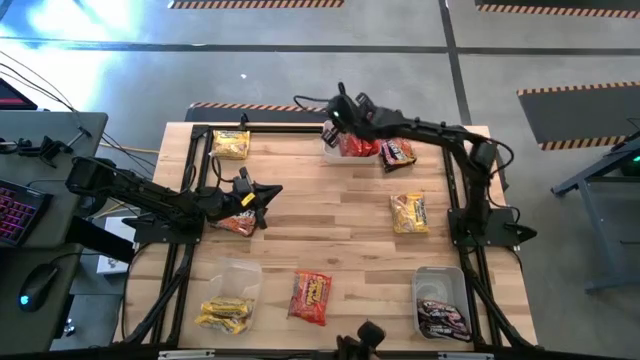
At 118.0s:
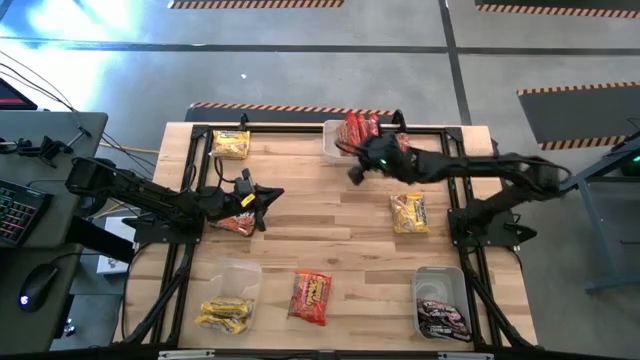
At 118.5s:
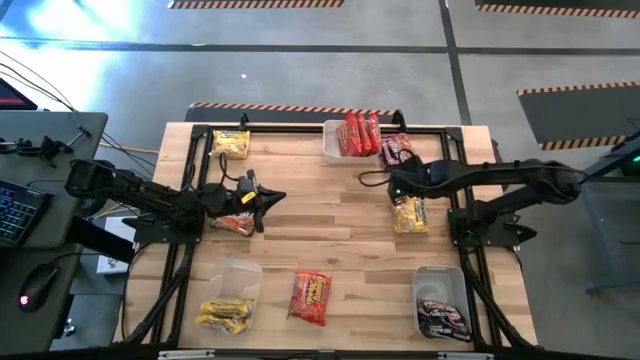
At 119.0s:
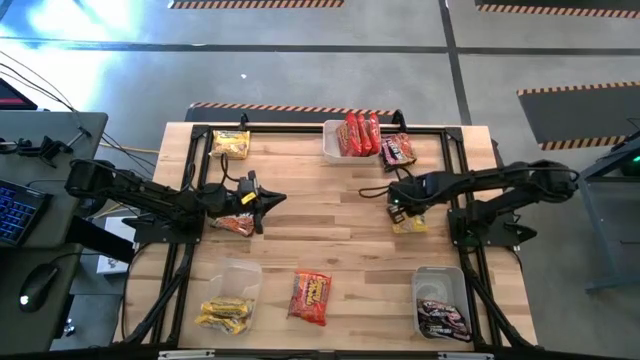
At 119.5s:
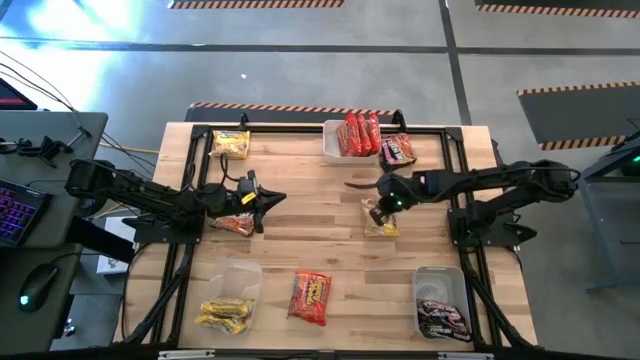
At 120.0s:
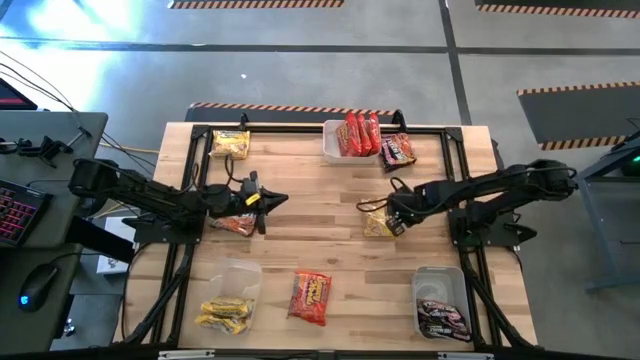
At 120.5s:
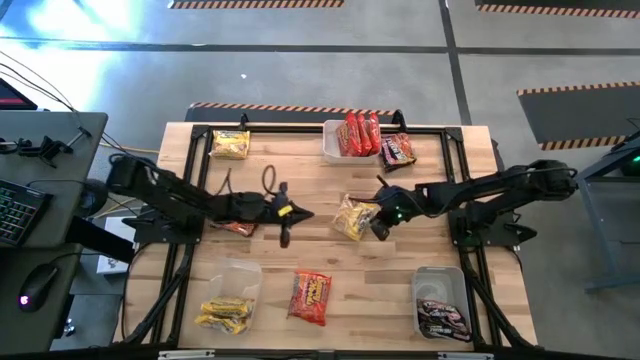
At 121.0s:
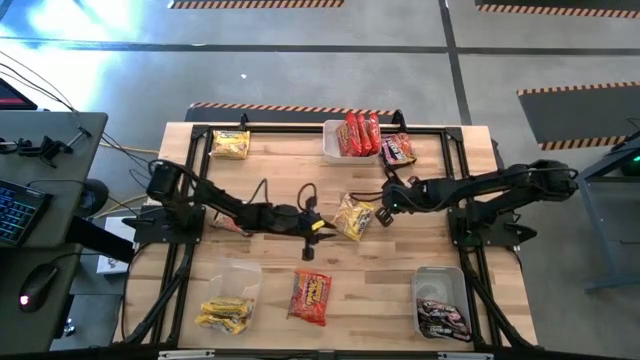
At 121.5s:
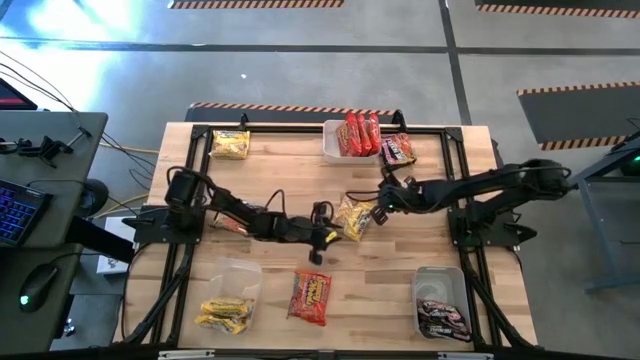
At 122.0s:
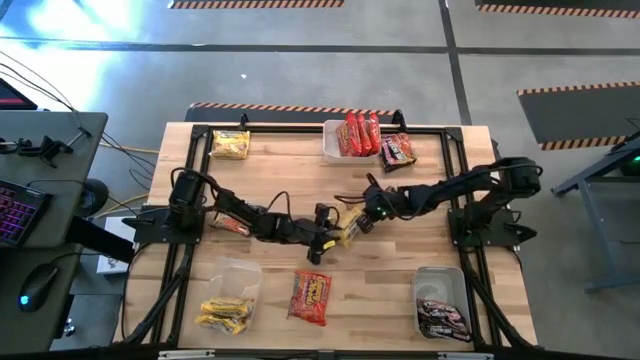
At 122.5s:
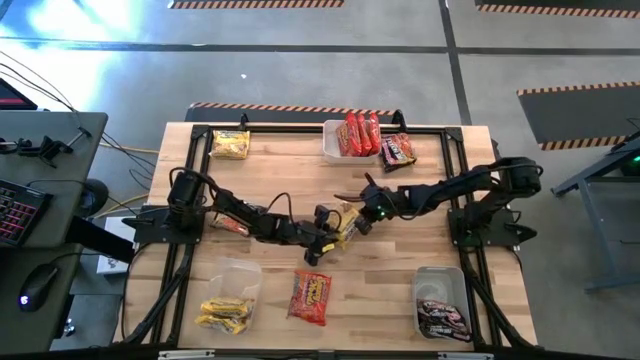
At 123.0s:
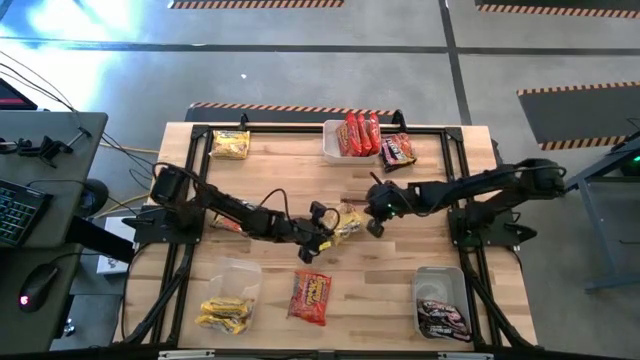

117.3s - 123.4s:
Task: Sort Maruchan noodles
Put the yellow noodle pack into the transparent bin

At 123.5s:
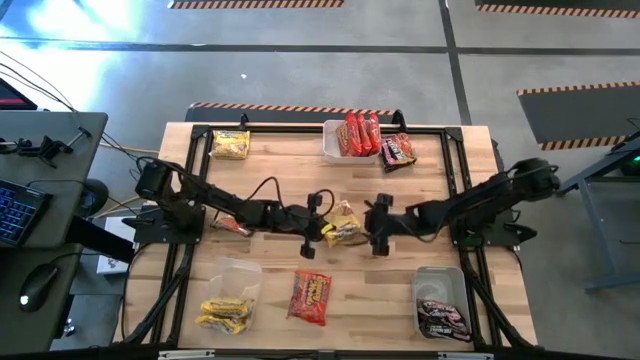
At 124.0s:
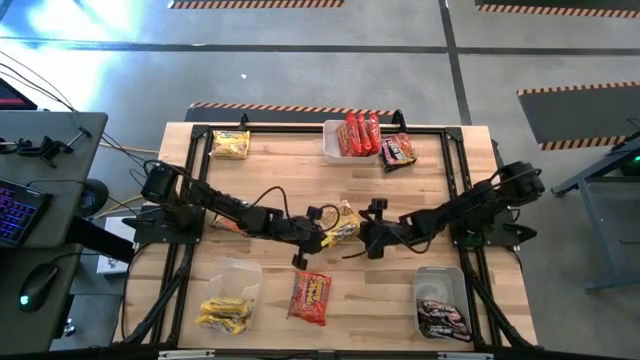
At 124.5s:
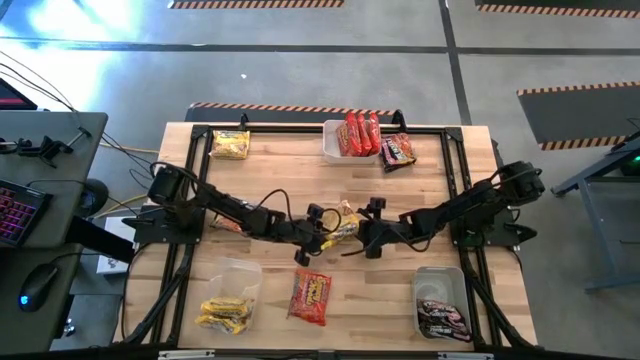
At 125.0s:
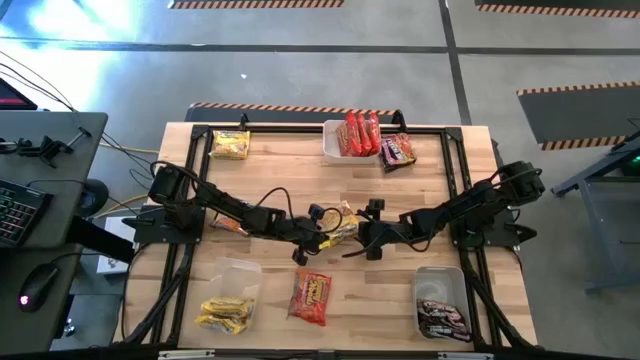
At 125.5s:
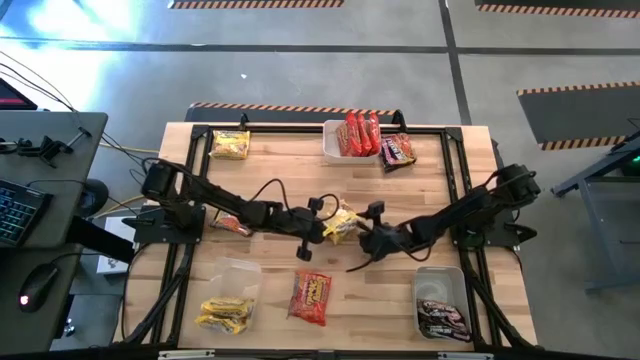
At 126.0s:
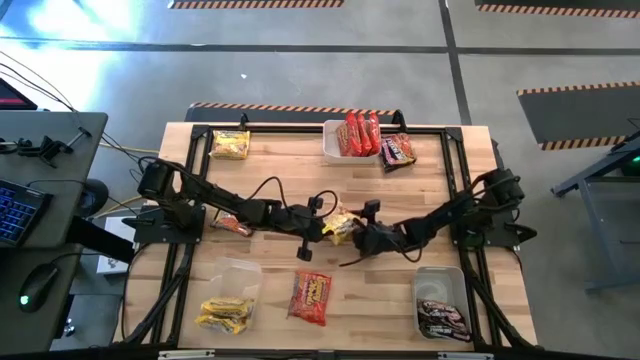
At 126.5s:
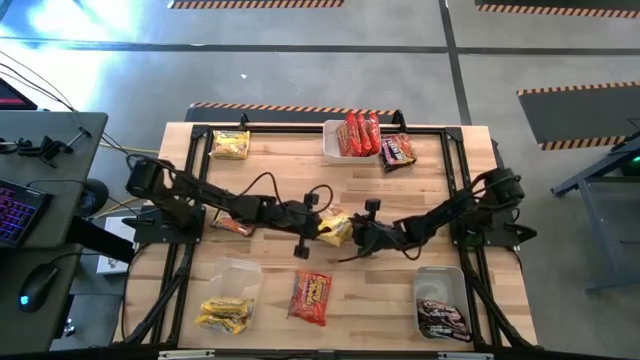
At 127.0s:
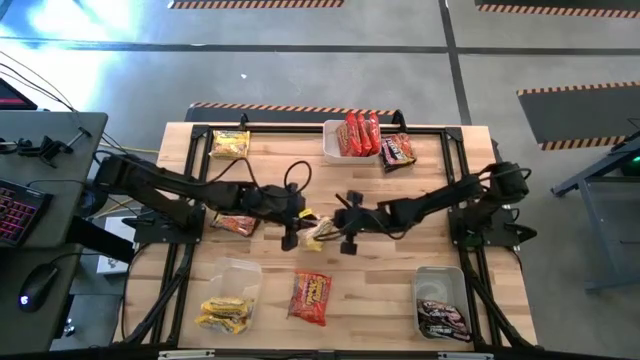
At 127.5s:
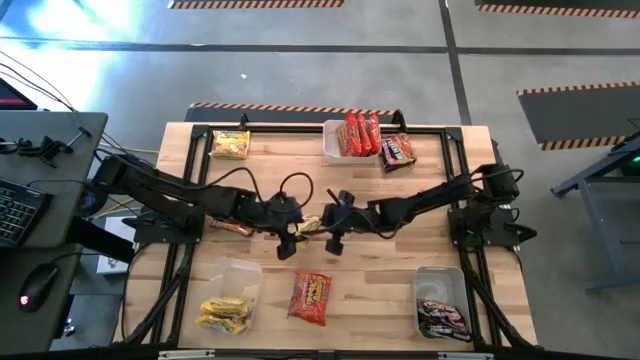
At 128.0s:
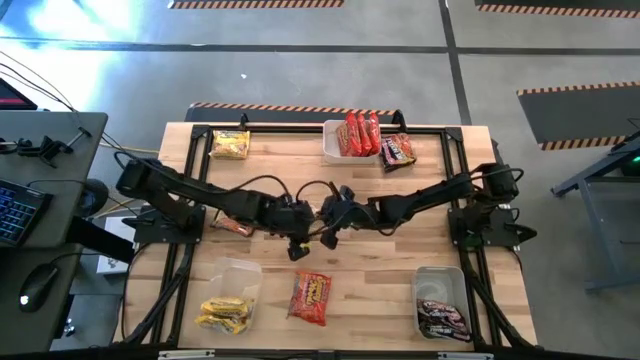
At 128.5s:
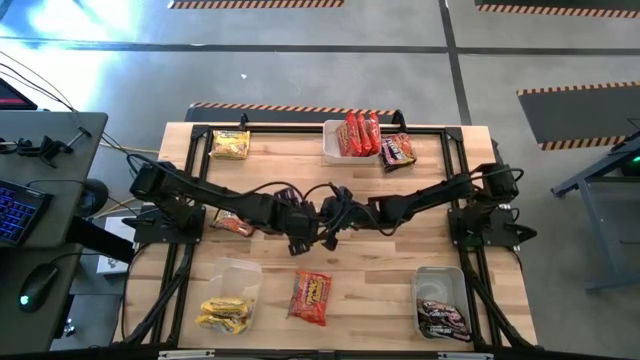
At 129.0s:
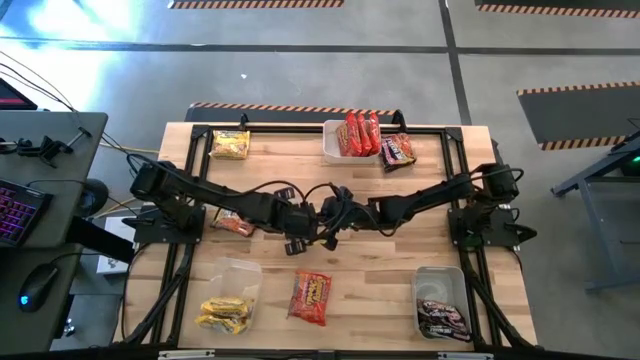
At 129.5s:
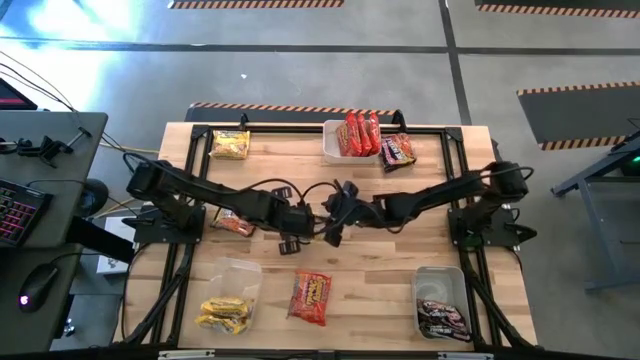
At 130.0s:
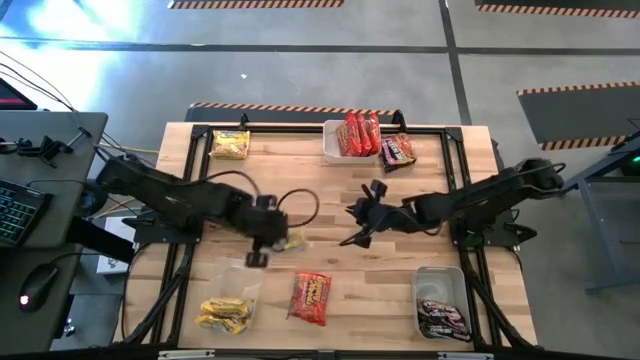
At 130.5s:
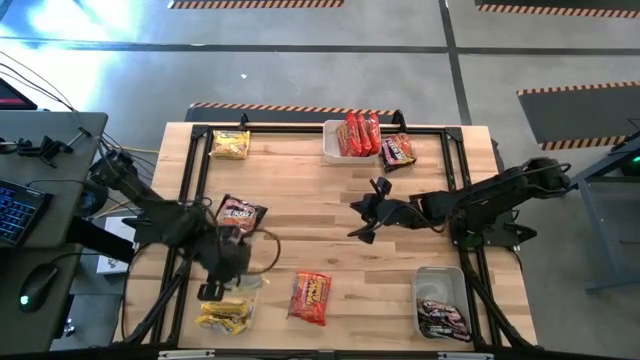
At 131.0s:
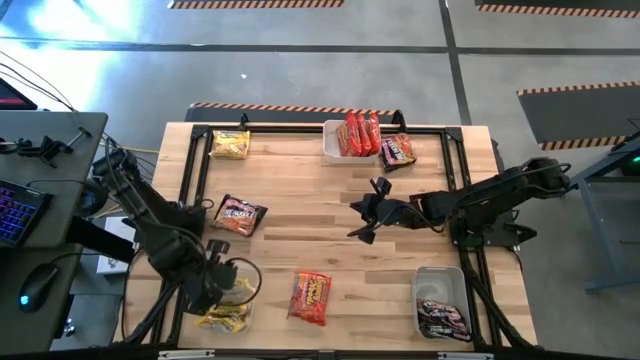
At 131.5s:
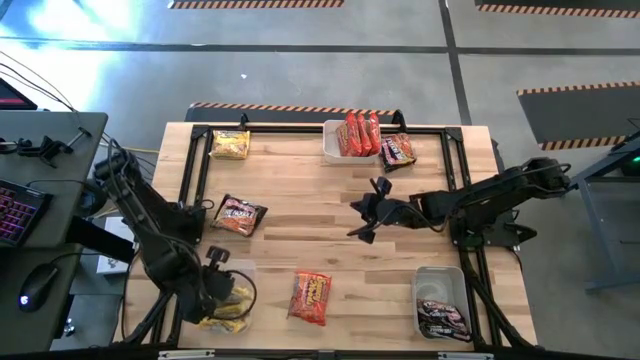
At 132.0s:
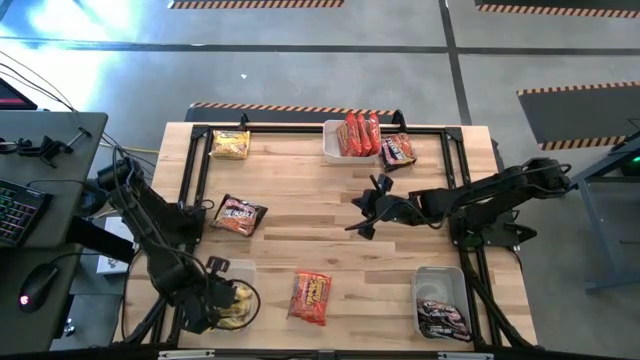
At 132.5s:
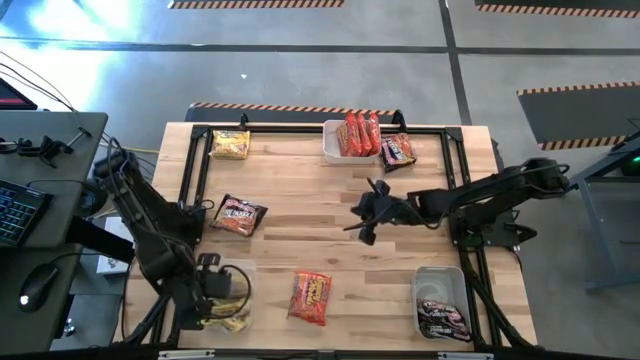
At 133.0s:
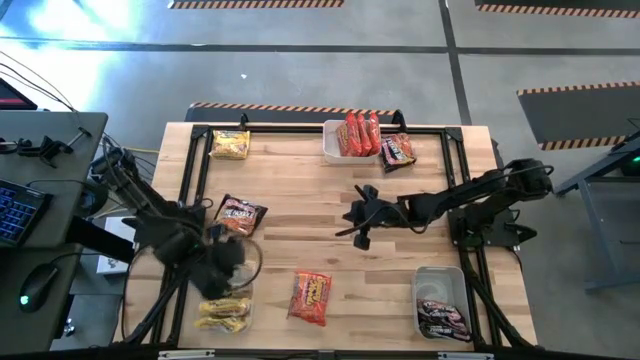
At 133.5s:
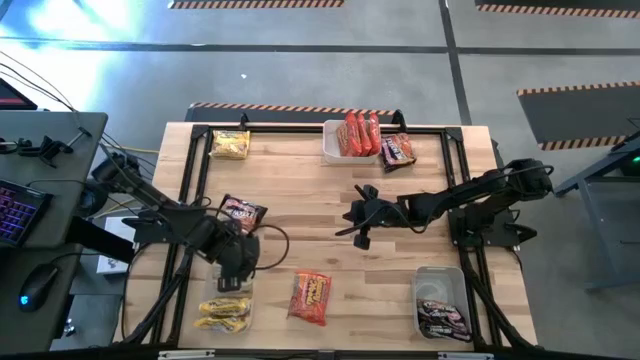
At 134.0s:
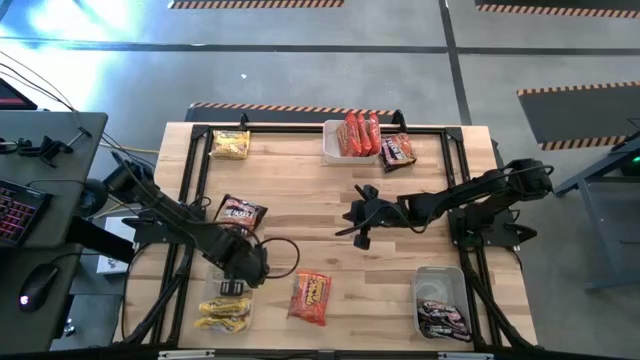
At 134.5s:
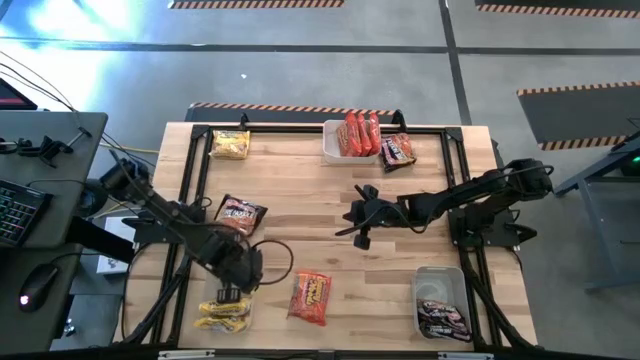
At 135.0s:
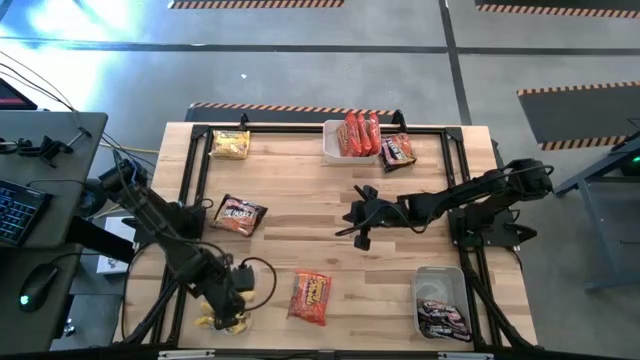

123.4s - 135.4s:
Put the yellow noodle pack into the transparent bin

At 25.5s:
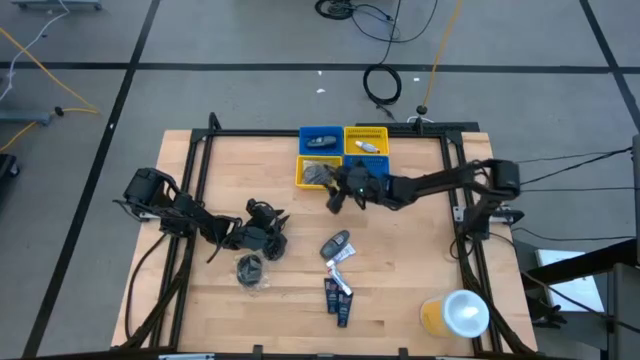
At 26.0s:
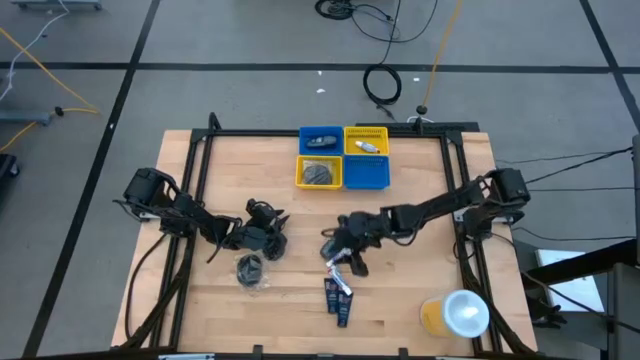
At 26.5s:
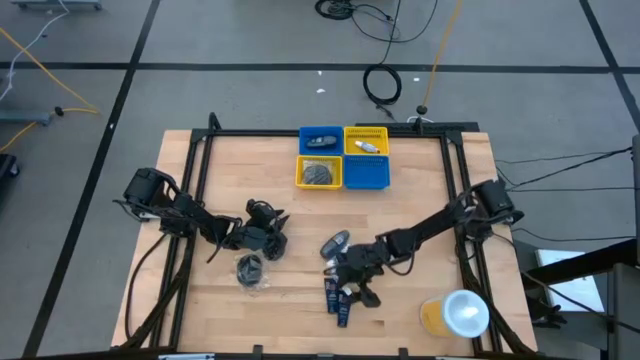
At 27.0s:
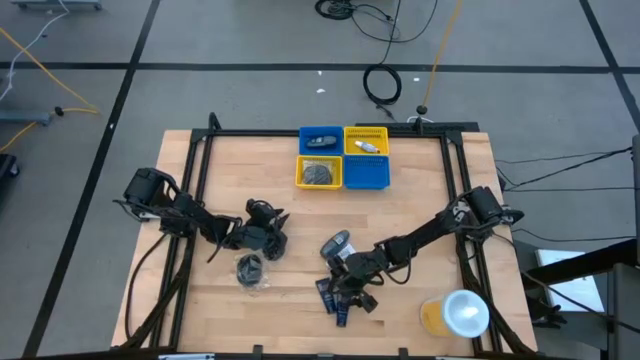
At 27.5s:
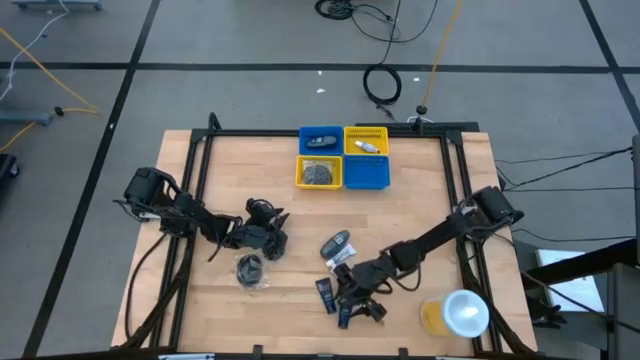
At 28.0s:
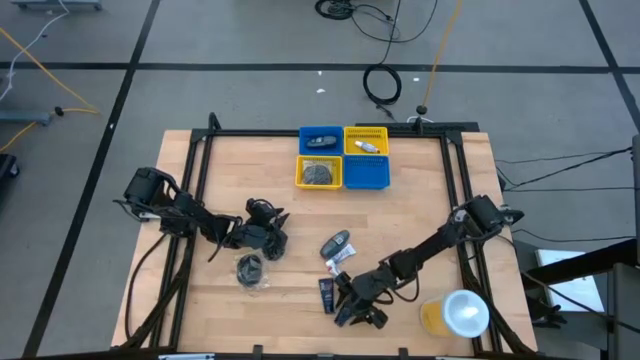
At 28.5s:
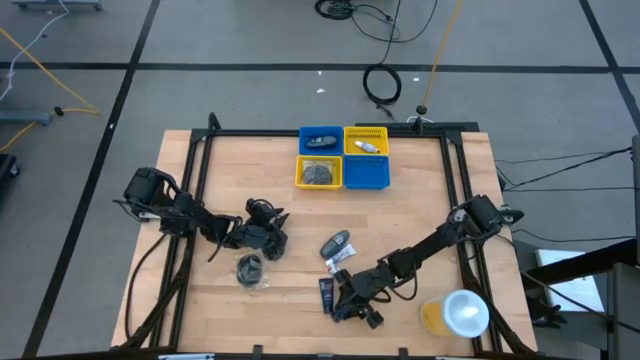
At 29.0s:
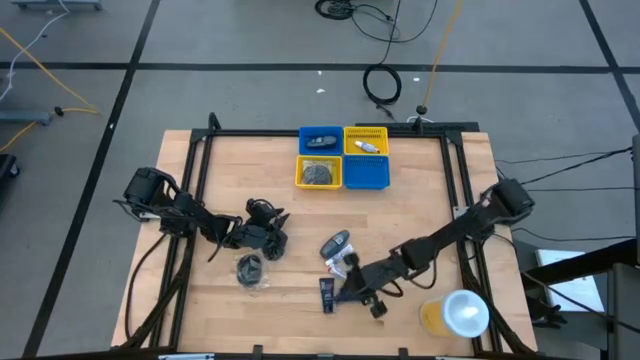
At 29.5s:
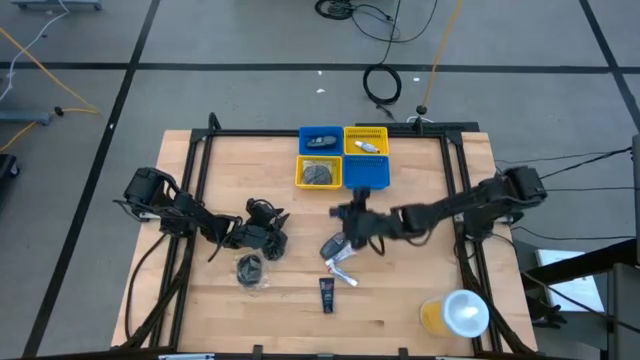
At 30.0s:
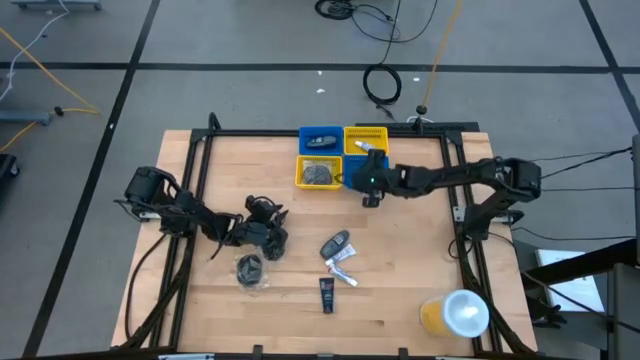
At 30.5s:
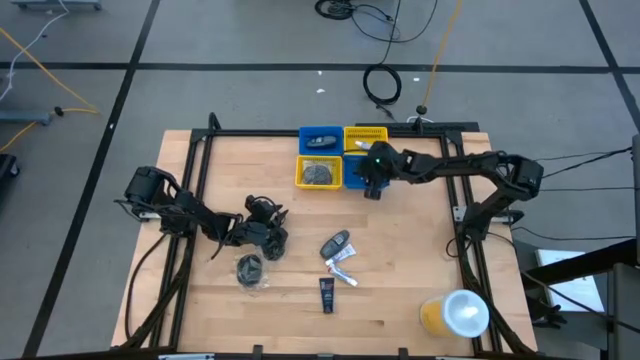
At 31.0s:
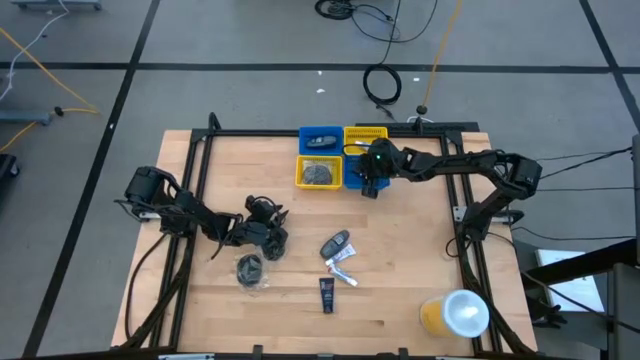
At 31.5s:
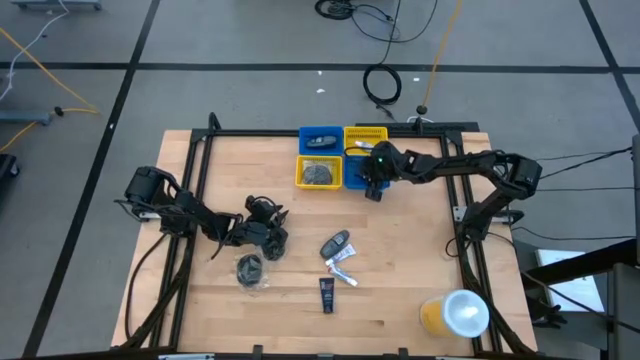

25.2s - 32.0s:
Task: Pick & Place Travel size toiletries
Put the blue shave cream into the right blue bin
